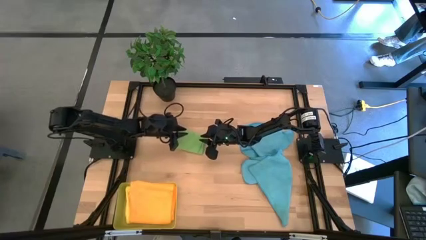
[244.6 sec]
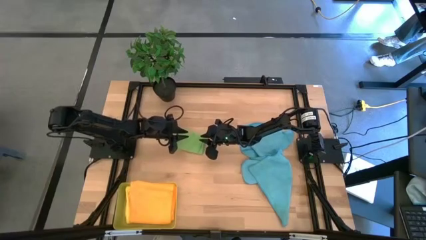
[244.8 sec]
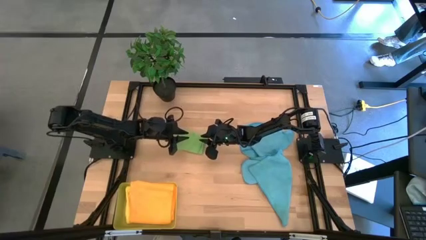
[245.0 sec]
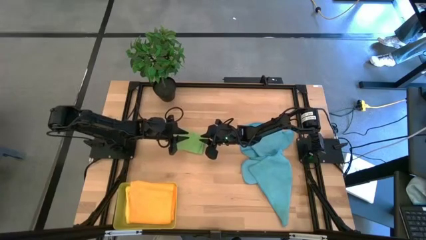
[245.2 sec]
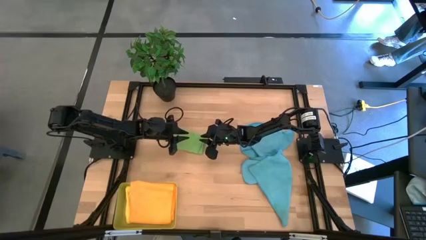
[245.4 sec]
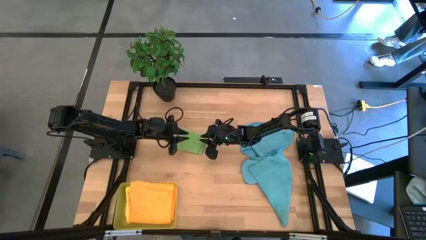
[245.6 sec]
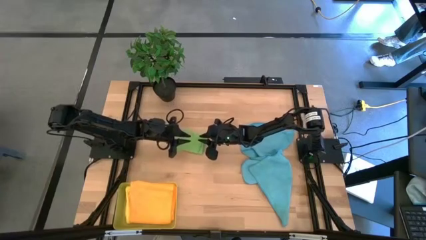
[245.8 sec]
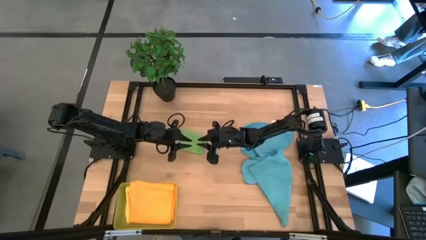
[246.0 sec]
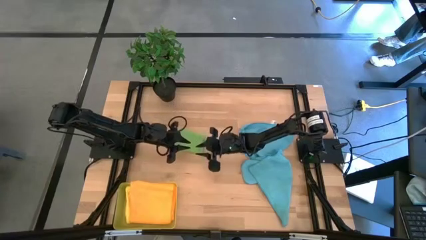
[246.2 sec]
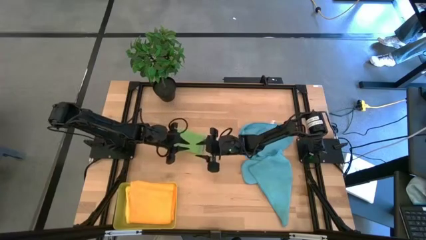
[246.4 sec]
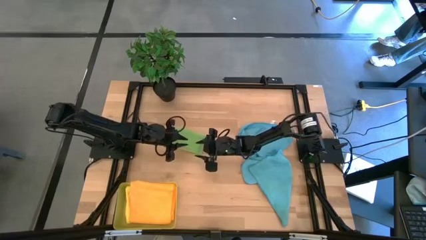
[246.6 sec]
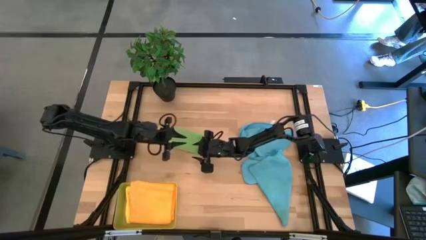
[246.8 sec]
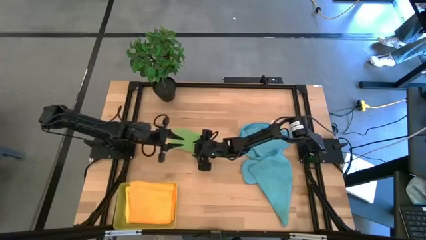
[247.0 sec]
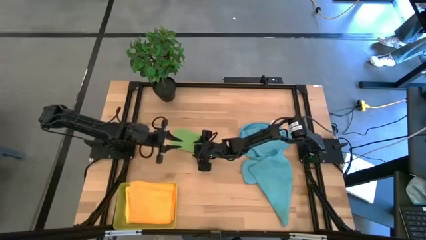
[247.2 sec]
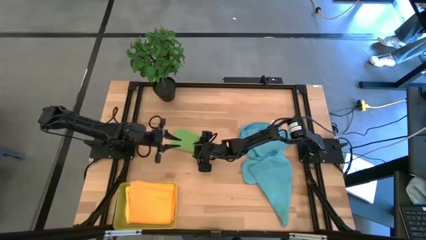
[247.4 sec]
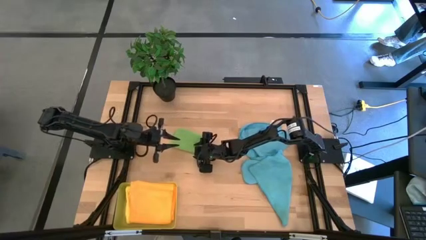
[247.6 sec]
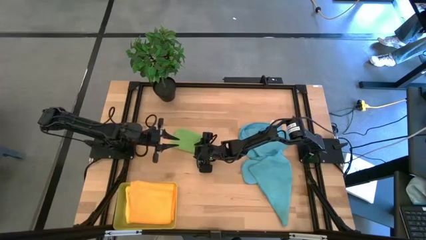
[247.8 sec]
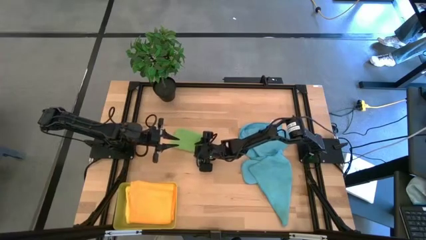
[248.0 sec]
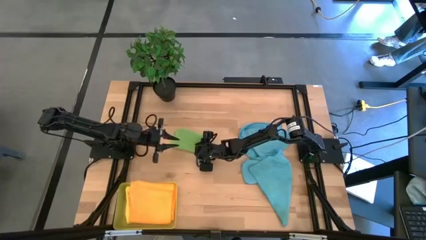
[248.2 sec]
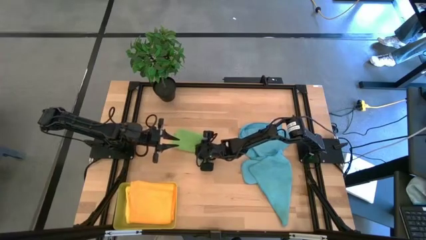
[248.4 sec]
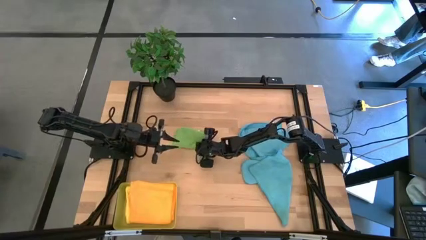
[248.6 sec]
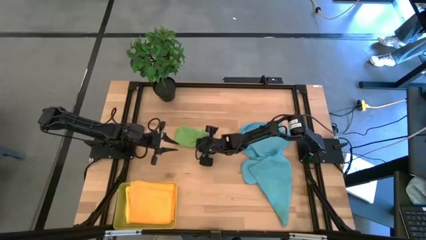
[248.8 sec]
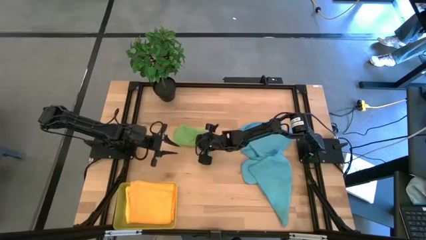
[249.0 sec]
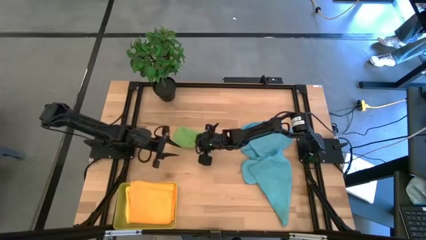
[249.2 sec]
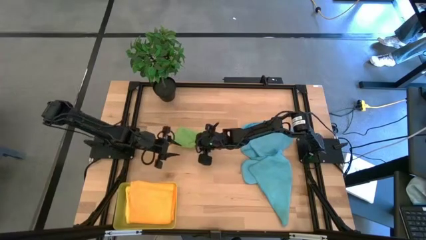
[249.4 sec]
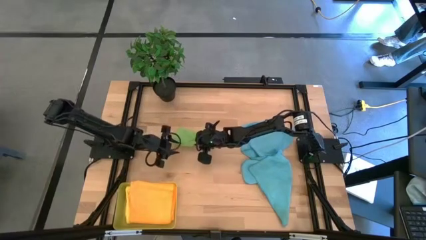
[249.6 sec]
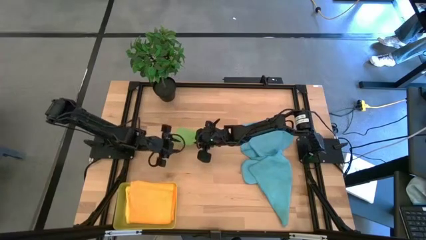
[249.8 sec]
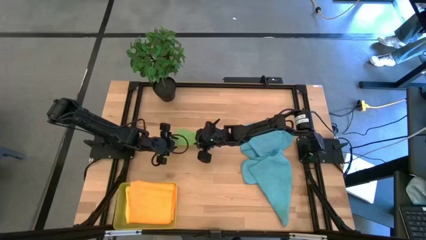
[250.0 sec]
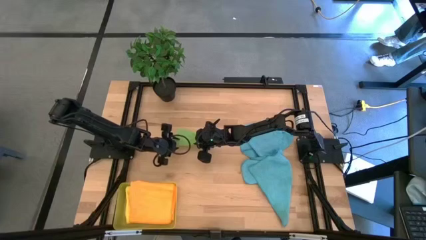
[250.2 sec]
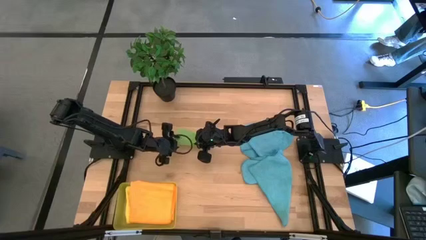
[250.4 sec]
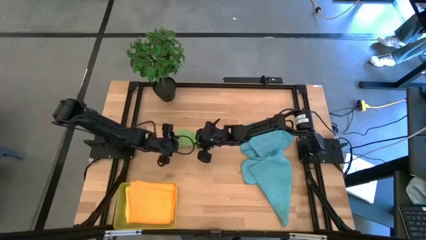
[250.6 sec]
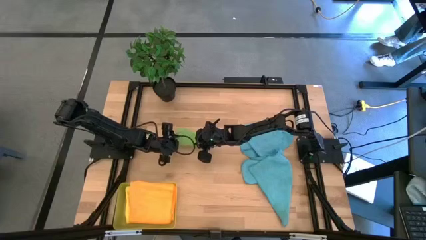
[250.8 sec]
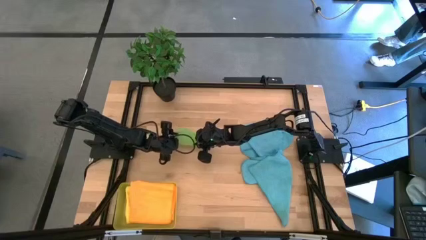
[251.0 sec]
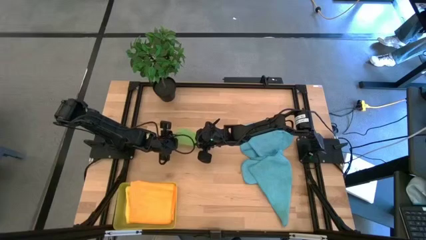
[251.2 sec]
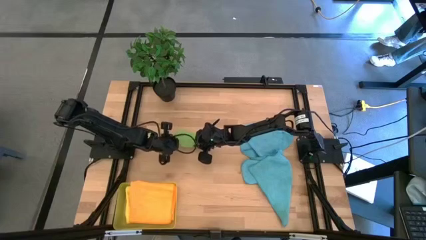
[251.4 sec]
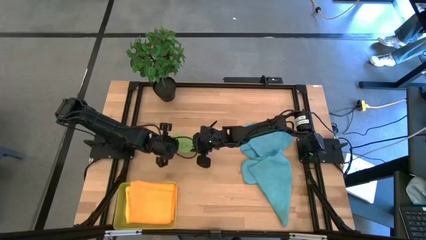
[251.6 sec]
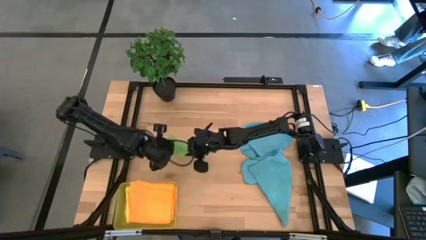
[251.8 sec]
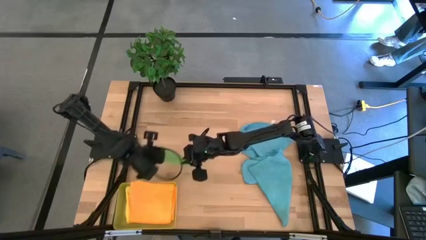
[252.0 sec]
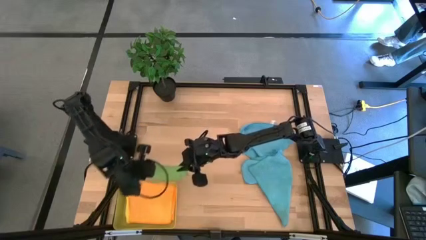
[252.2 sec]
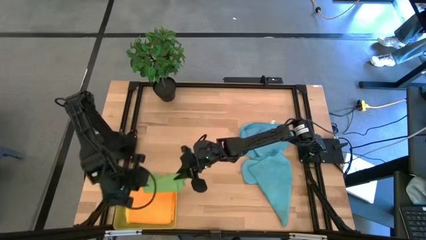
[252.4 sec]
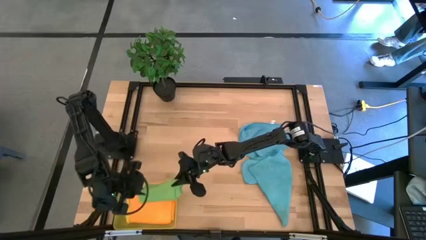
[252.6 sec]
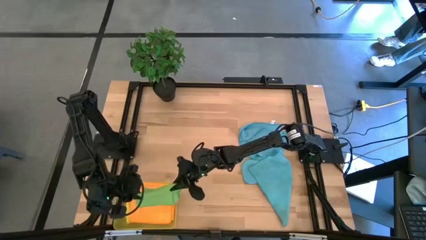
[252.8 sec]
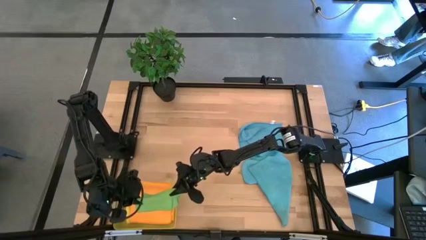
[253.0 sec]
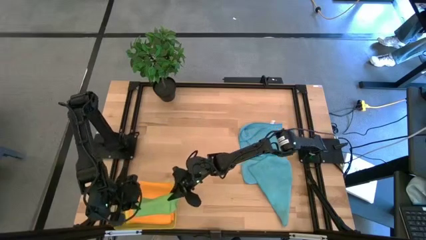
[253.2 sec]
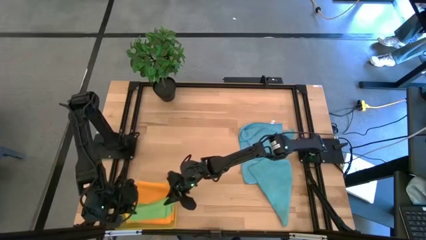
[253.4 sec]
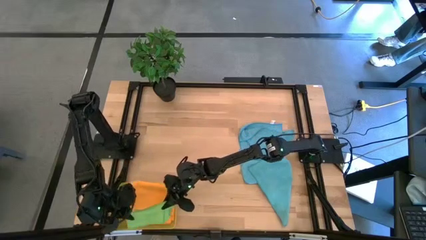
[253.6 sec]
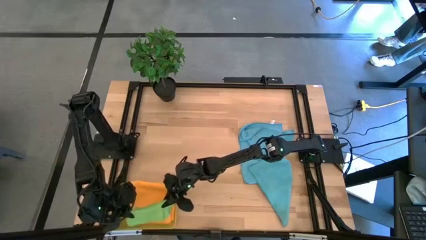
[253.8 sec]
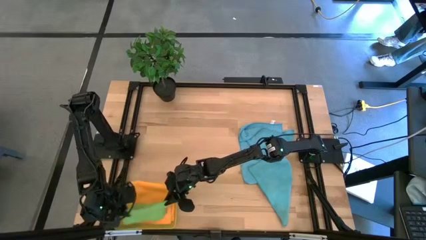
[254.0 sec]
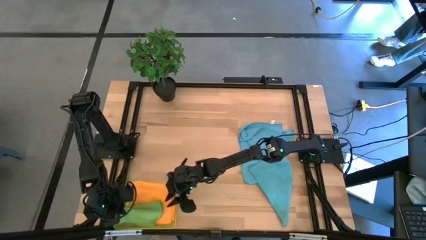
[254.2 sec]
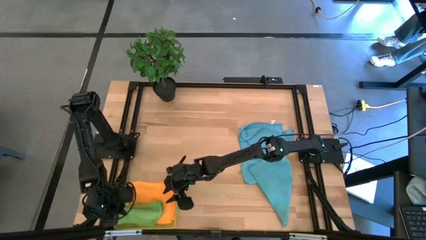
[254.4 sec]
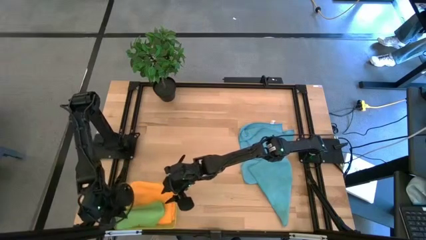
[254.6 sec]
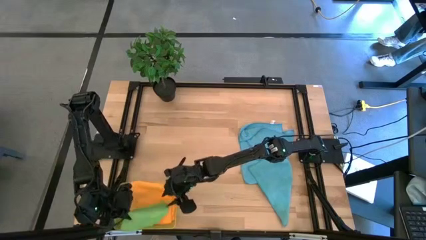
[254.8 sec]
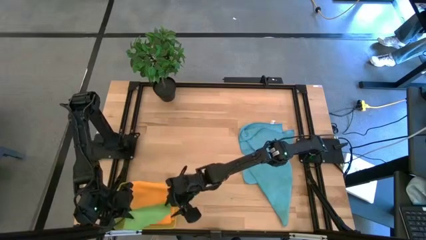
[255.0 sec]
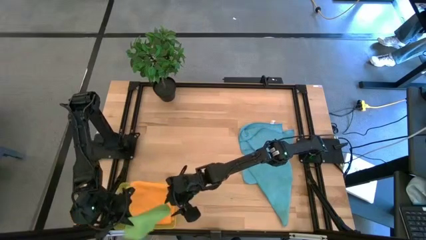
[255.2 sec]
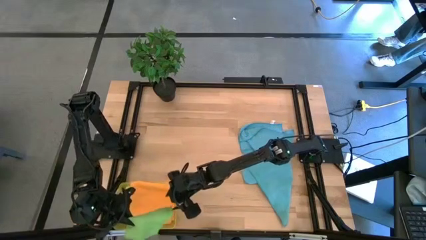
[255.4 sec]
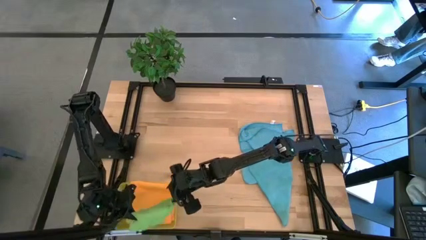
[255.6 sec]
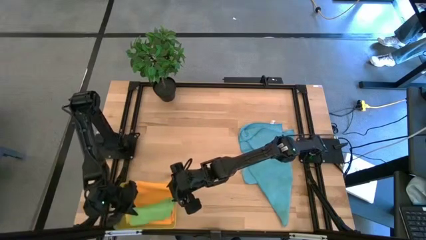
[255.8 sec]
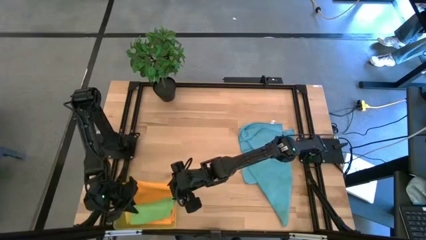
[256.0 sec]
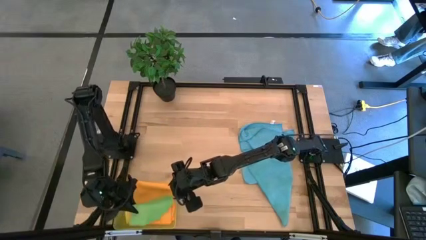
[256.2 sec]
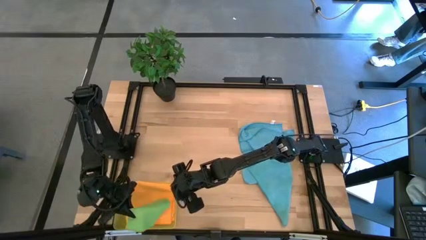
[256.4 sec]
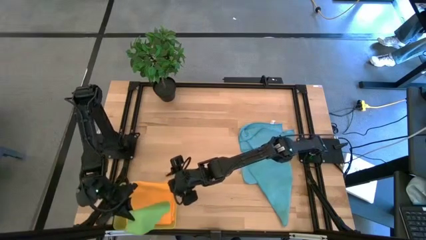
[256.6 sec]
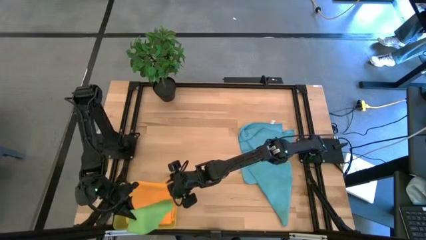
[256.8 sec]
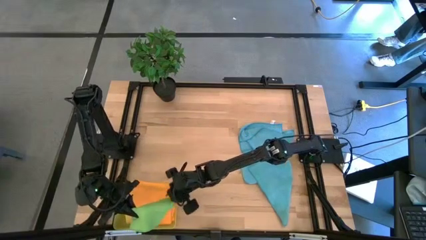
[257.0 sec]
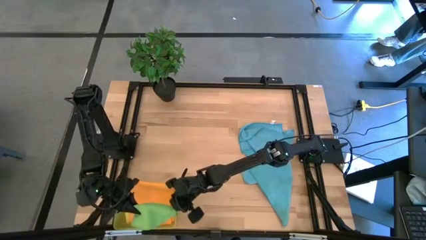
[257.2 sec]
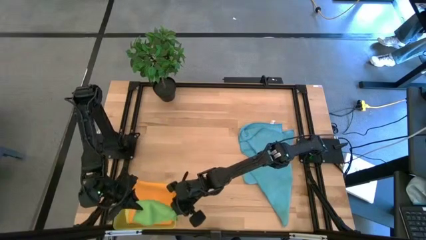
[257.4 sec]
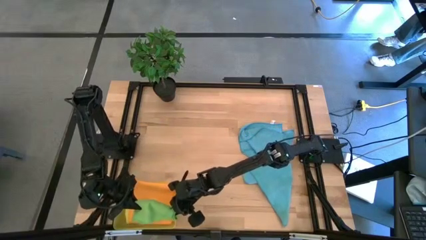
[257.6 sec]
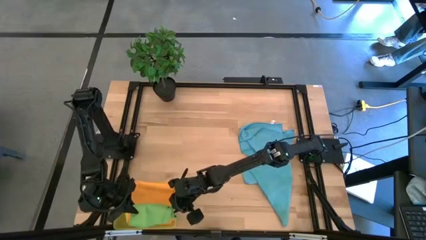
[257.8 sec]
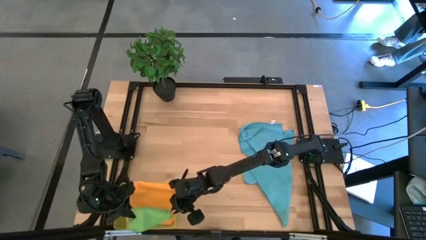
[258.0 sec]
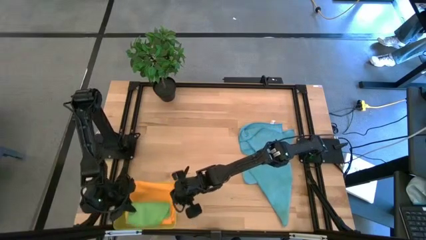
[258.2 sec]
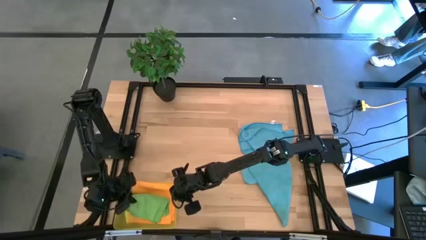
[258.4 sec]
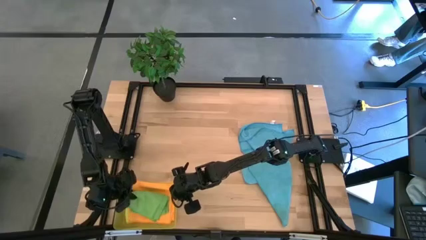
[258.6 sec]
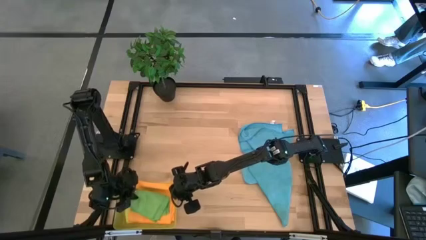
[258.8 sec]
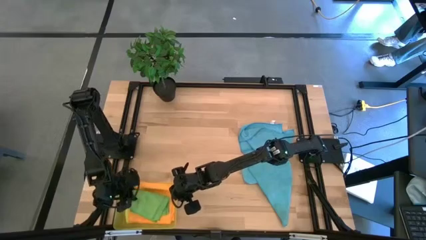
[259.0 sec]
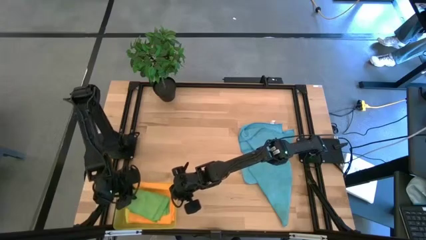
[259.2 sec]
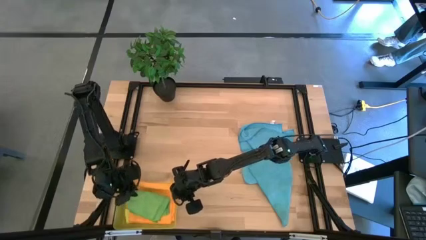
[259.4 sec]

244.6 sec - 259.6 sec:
Task: Fold microfiber towels
Put the folded green microfiber cloth into the yellow bin
